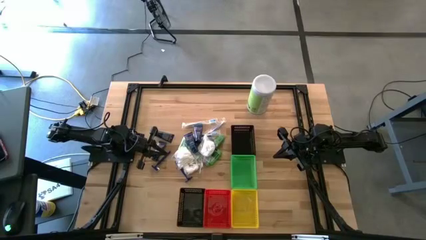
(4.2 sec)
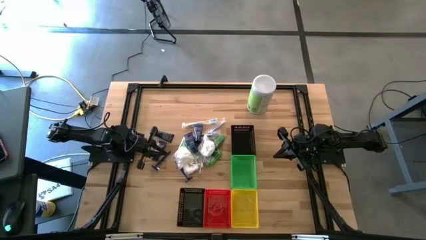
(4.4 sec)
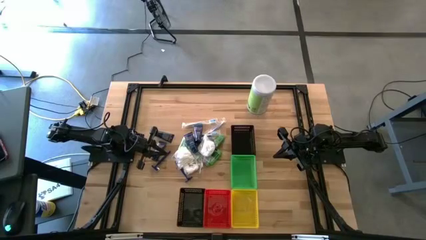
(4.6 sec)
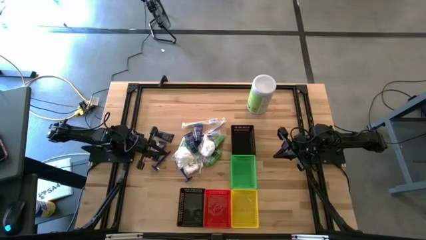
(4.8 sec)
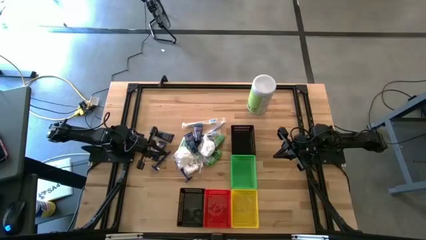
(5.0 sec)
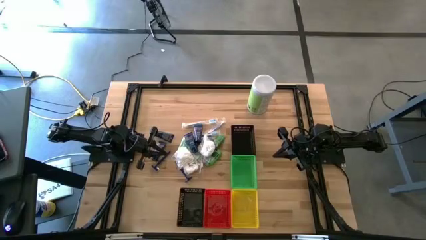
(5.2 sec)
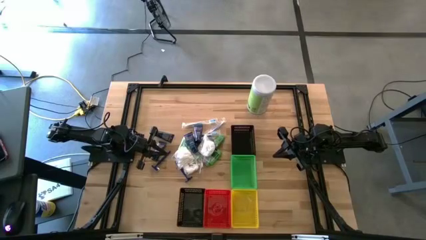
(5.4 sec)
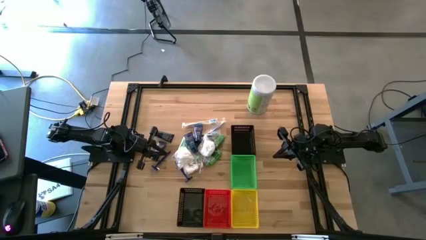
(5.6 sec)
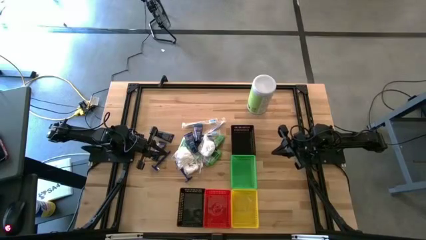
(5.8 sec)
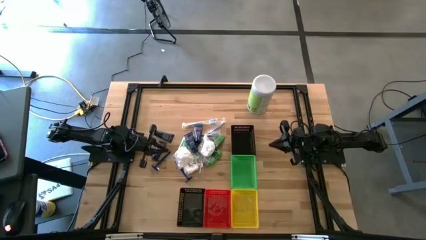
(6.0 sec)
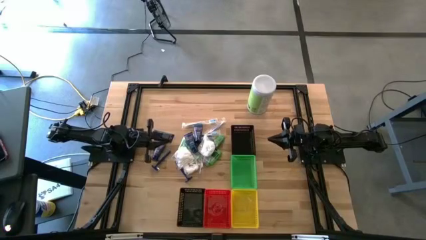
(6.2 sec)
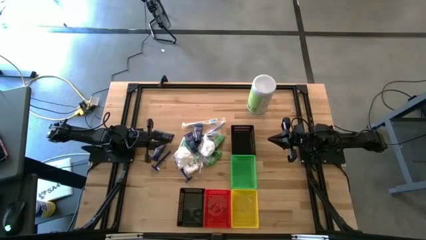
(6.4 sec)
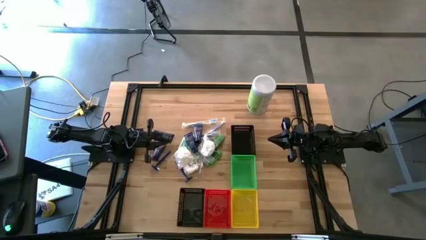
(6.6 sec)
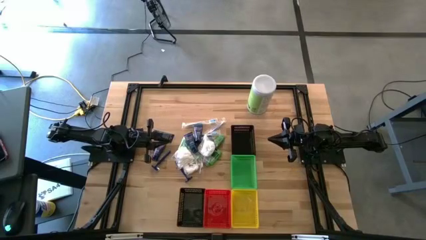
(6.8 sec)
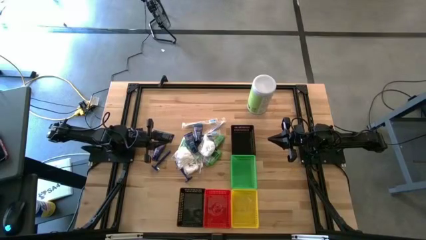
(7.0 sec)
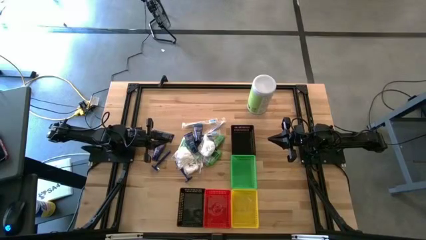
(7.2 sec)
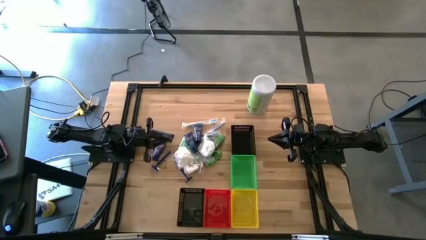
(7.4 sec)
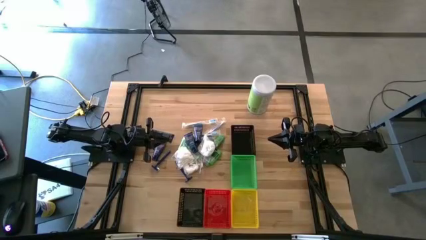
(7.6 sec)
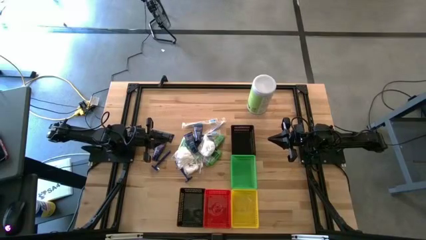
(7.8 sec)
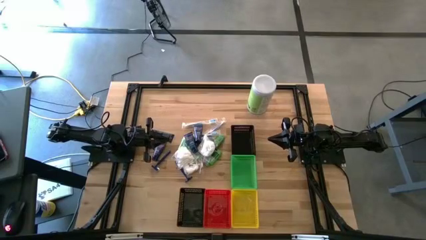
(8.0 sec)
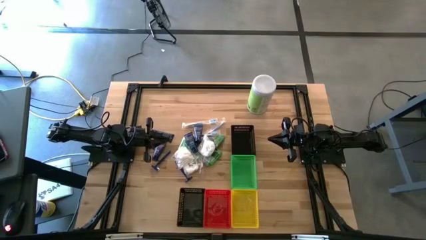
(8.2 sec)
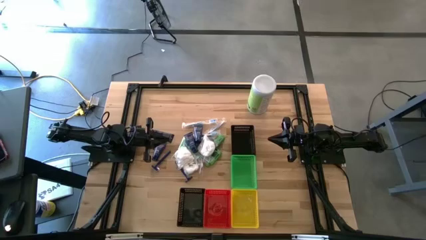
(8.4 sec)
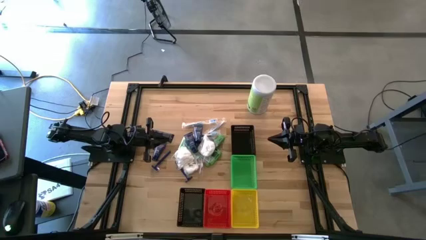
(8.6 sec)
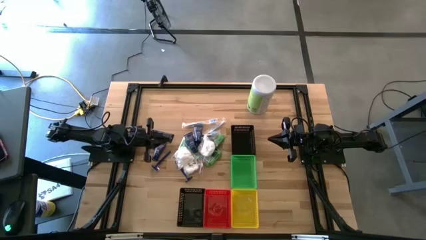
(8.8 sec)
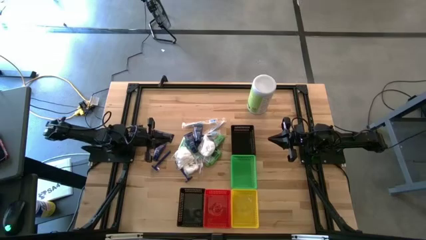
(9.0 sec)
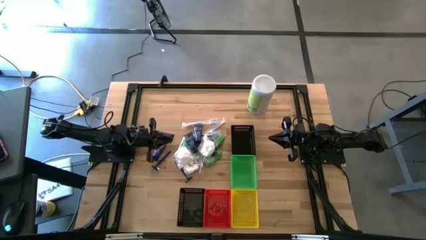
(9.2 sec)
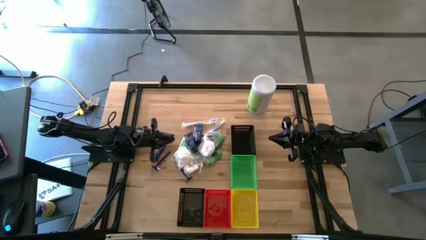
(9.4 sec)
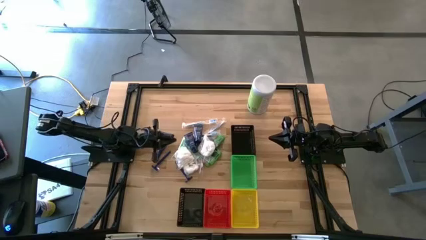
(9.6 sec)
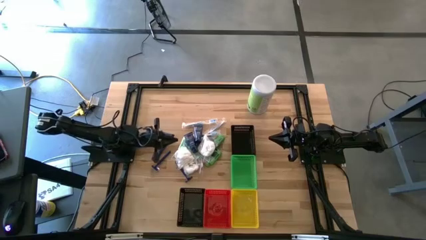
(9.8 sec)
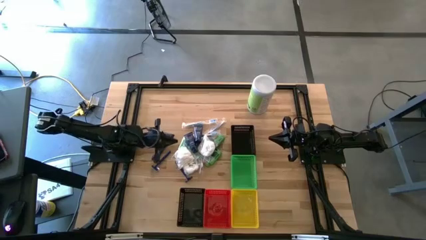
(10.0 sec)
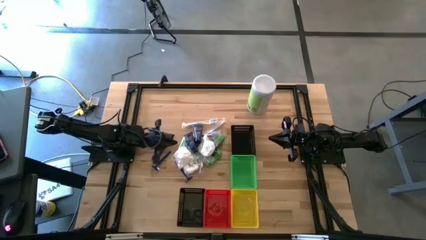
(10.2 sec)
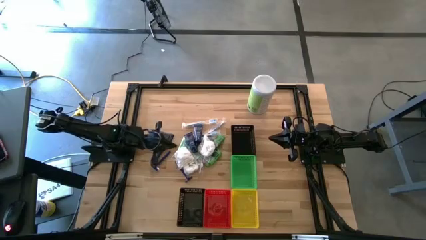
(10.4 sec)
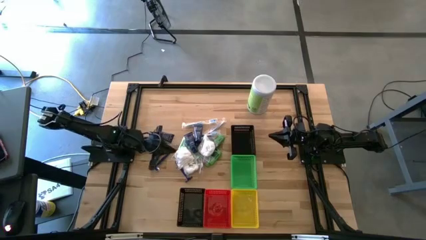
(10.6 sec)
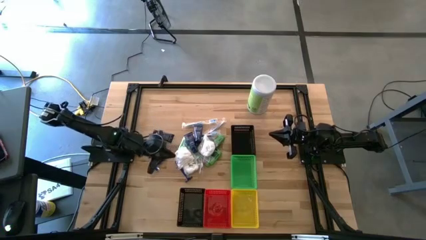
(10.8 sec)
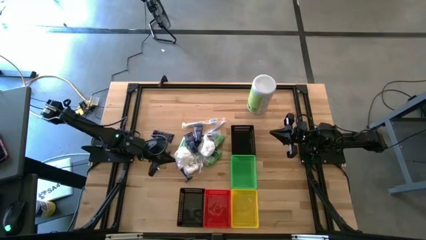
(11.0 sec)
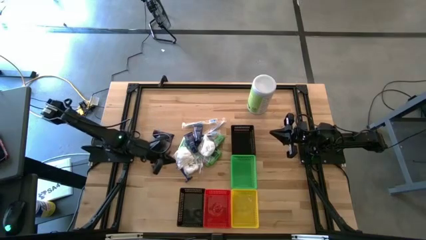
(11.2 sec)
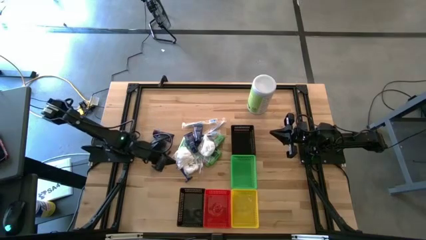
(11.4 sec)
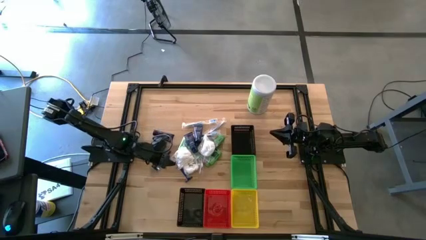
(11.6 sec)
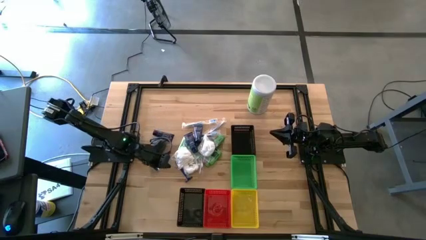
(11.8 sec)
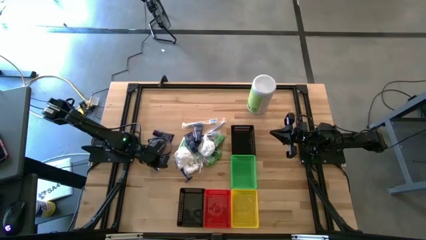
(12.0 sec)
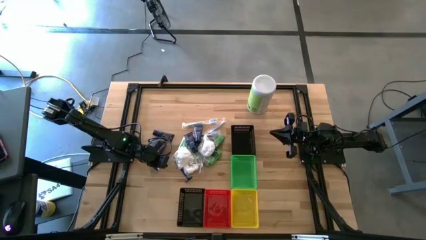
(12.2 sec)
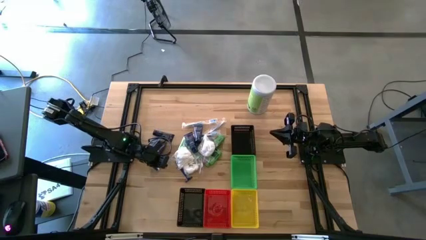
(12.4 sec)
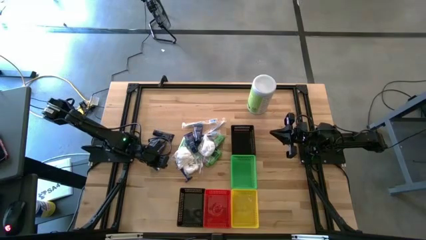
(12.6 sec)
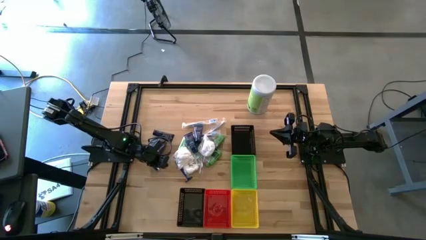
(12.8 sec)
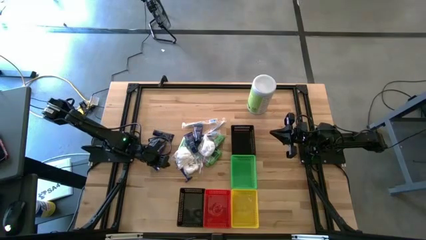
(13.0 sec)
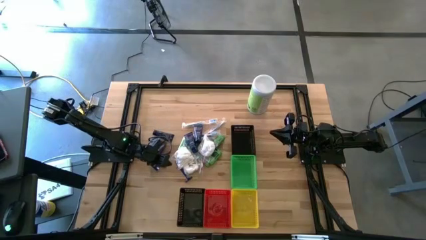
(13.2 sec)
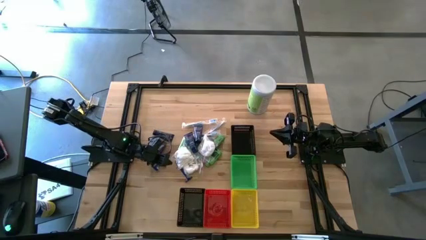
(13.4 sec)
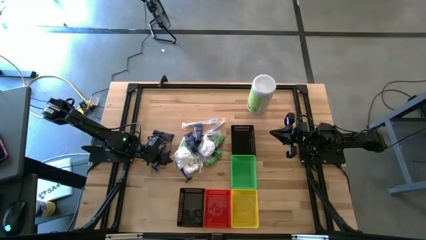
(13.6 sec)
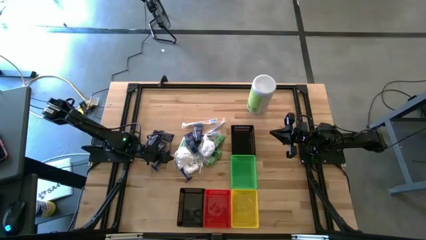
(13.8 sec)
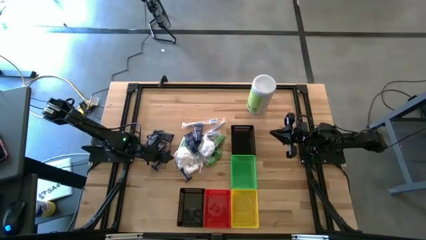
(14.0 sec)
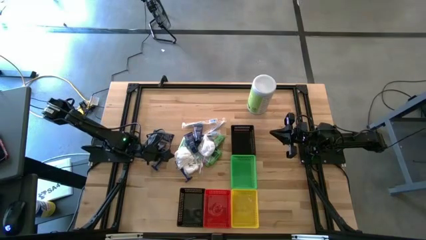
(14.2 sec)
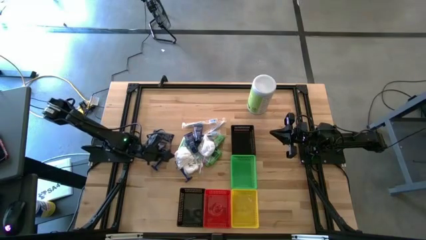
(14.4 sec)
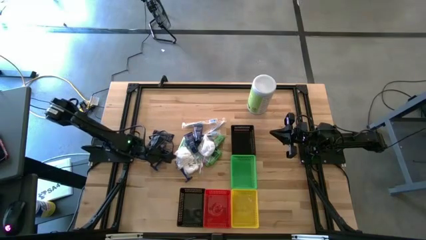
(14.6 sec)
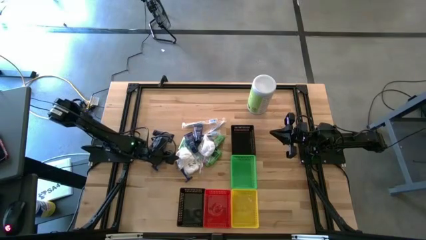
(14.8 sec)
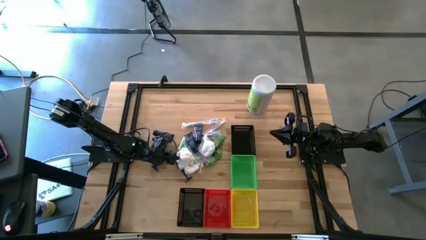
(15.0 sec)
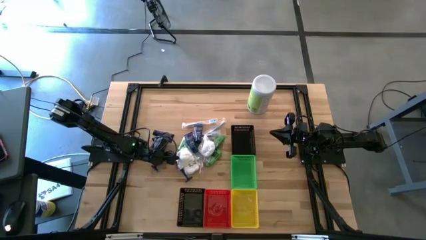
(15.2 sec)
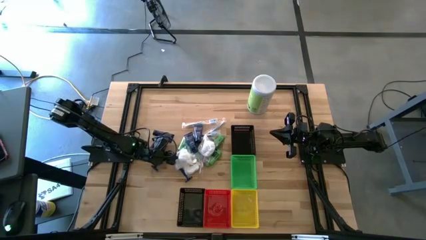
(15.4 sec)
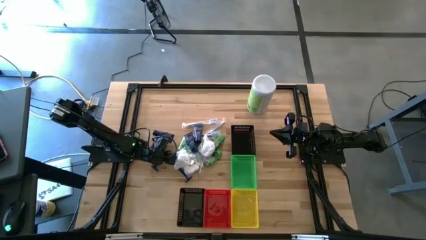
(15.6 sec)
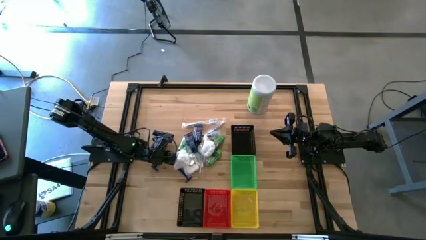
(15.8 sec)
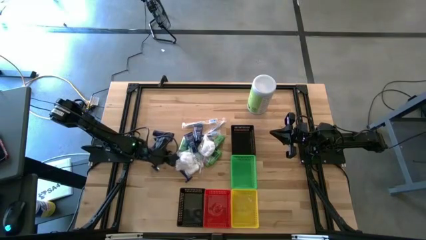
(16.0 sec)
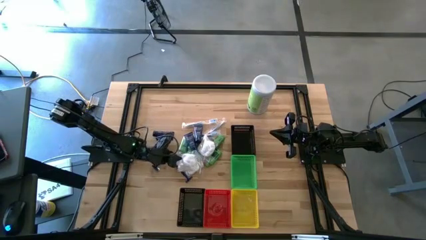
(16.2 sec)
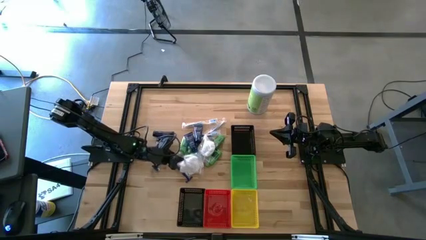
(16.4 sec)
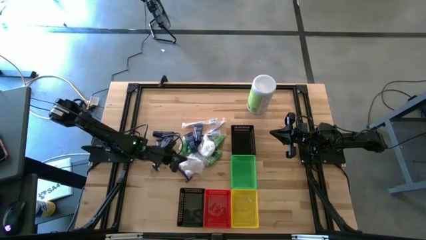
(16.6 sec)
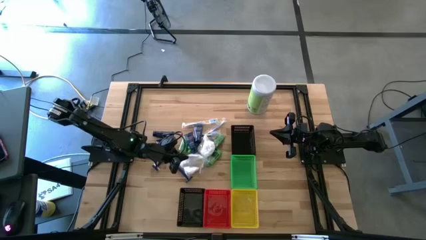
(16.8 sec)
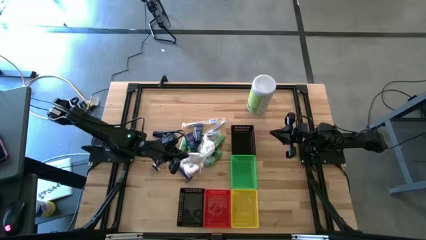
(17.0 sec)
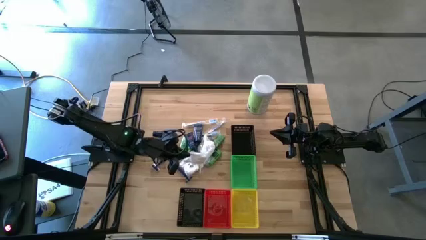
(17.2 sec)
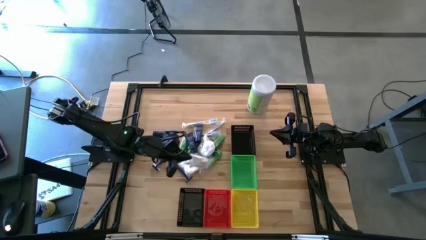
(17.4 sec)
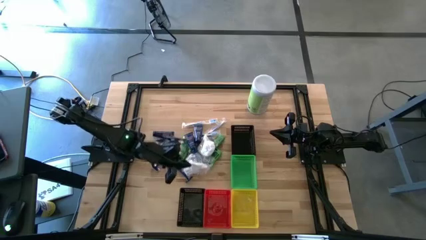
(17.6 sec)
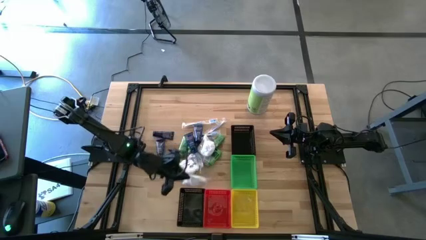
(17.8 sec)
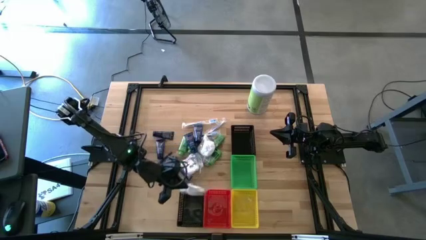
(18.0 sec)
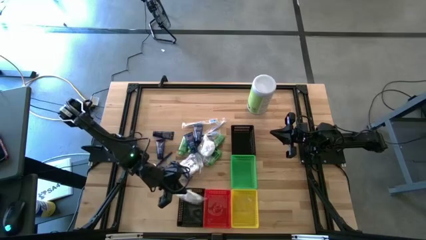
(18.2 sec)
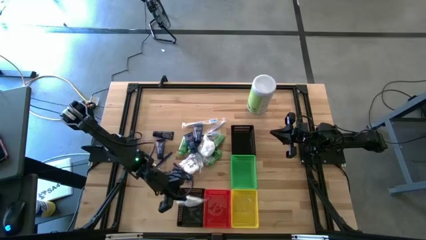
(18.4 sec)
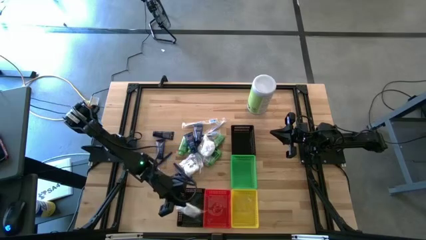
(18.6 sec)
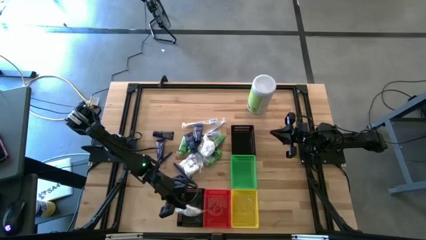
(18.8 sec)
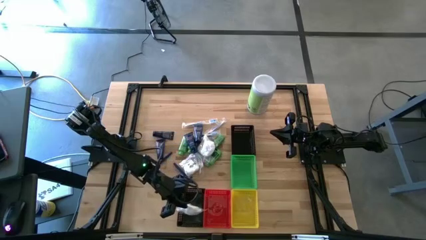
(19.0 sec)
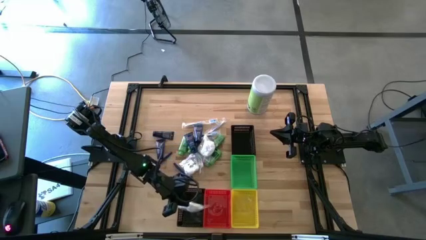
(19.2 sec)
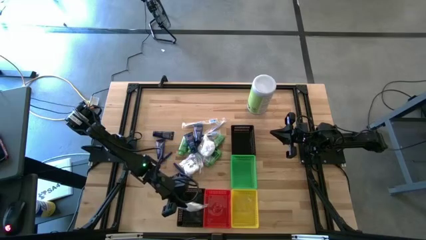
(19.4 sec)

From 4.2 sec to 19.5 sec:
Task: Pick & Place Travel size toiletries
Put the white cotton pack into the bottom black bin
